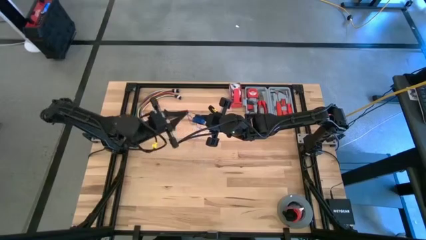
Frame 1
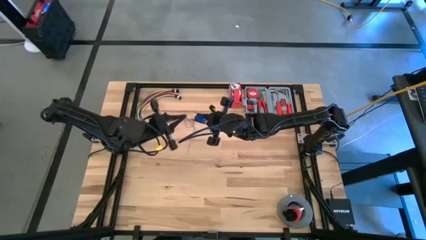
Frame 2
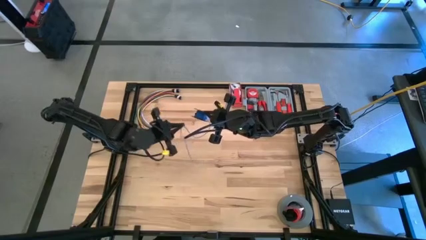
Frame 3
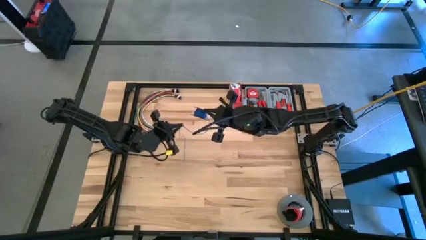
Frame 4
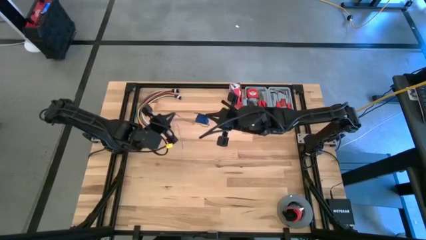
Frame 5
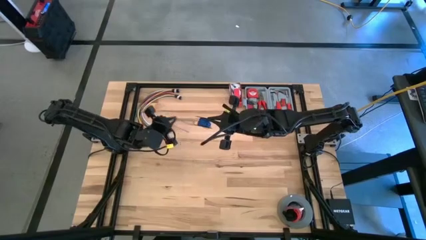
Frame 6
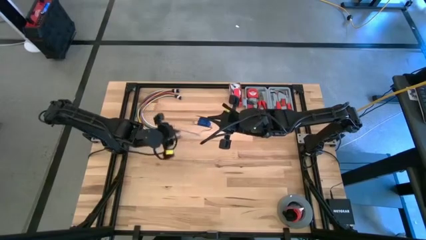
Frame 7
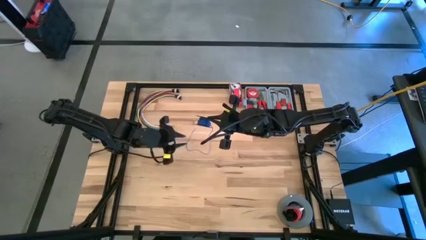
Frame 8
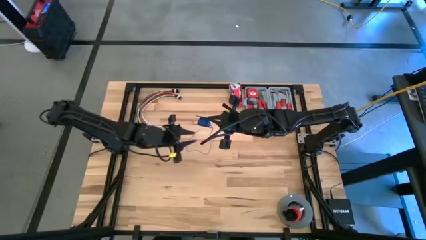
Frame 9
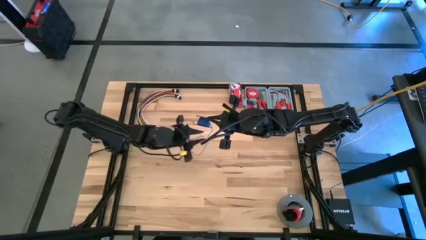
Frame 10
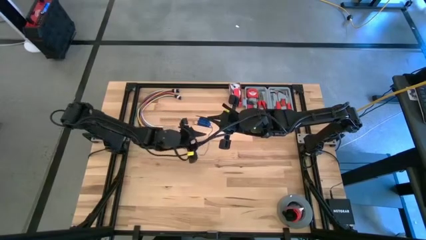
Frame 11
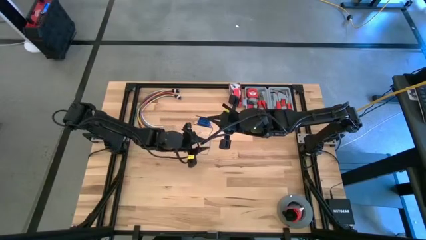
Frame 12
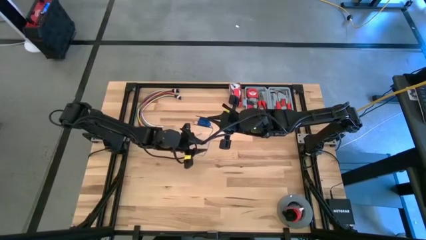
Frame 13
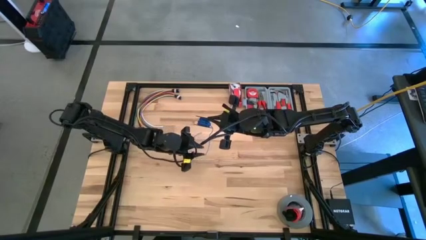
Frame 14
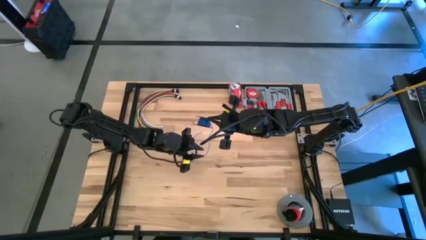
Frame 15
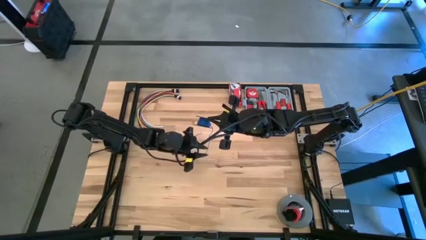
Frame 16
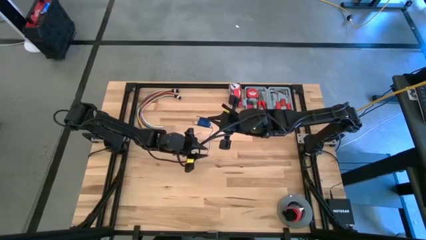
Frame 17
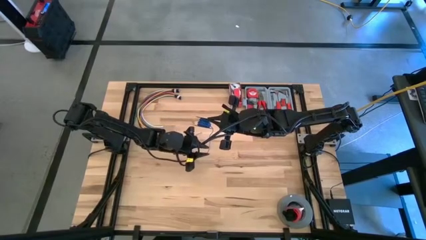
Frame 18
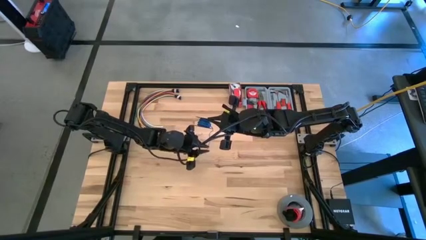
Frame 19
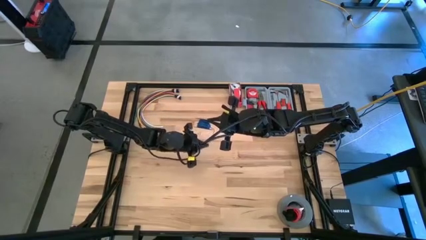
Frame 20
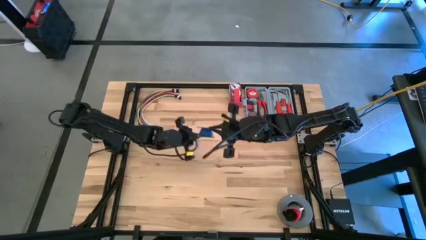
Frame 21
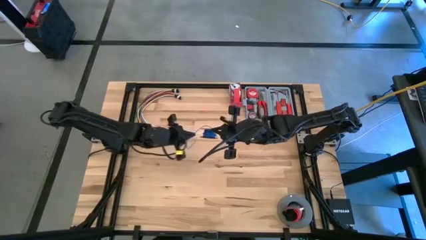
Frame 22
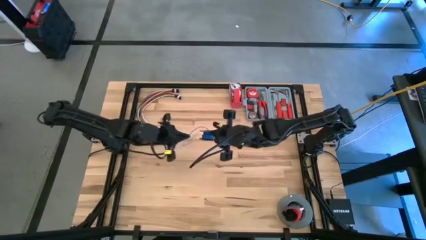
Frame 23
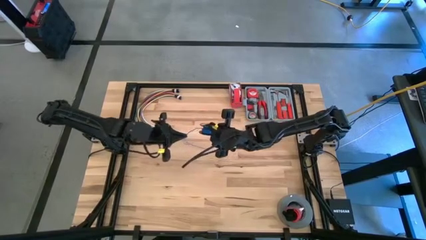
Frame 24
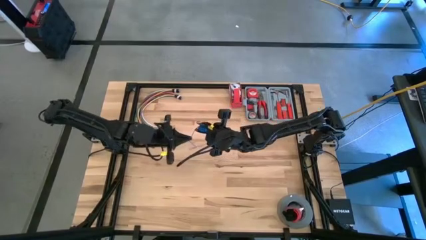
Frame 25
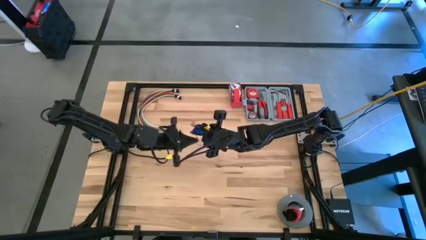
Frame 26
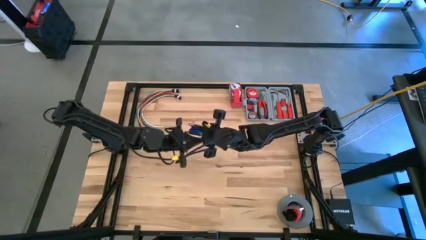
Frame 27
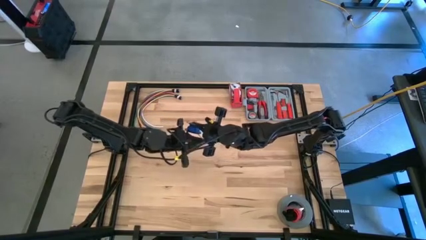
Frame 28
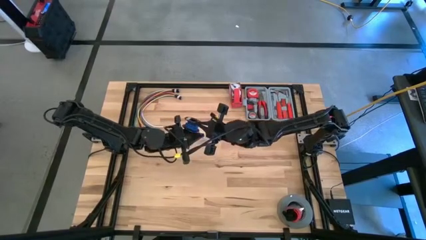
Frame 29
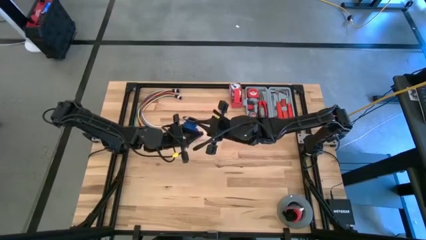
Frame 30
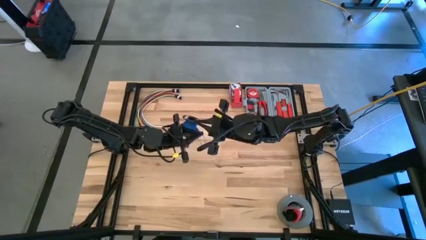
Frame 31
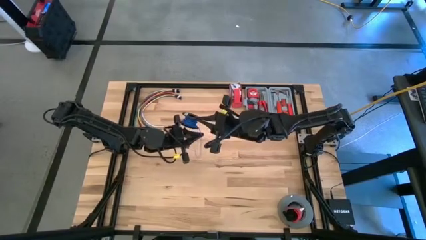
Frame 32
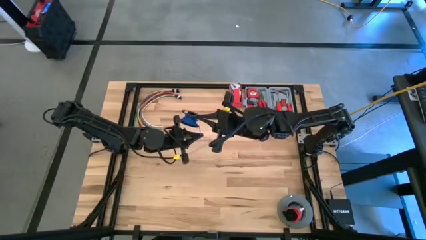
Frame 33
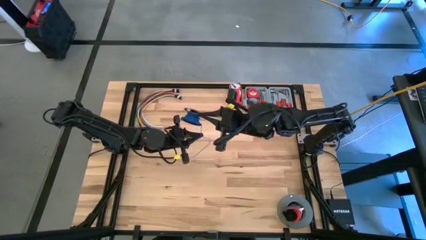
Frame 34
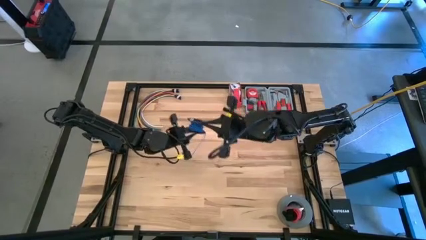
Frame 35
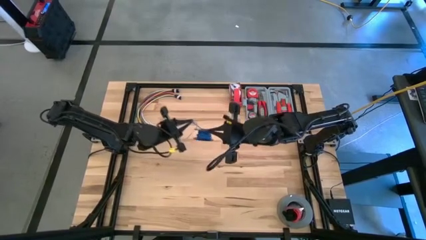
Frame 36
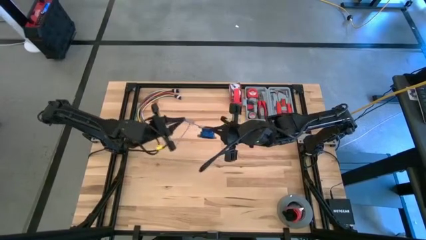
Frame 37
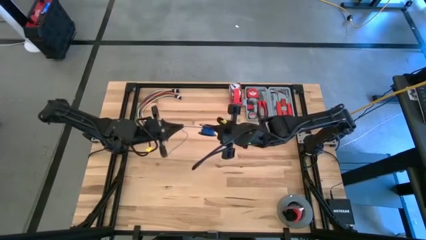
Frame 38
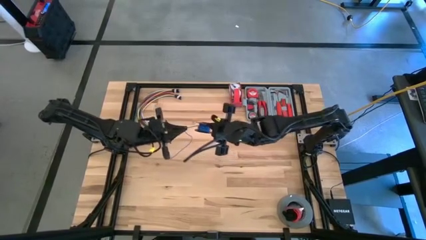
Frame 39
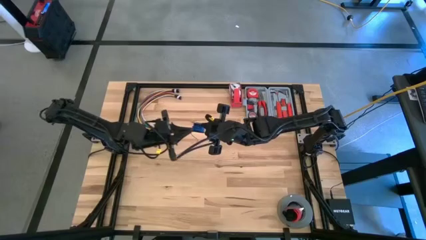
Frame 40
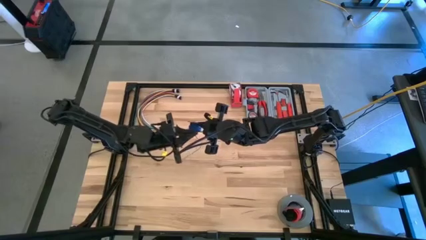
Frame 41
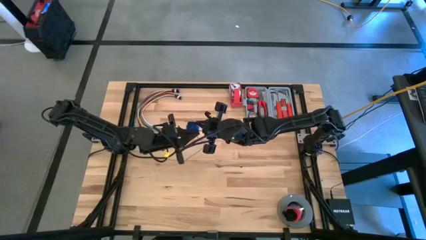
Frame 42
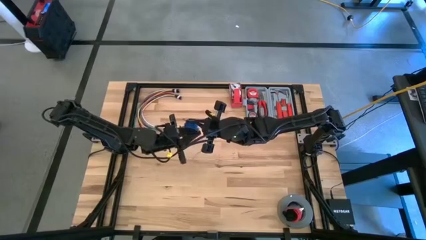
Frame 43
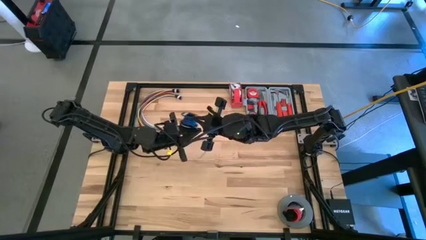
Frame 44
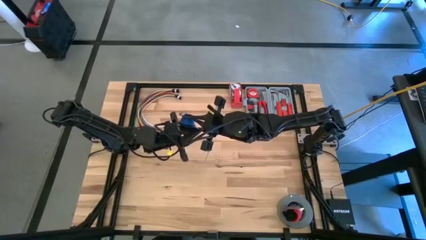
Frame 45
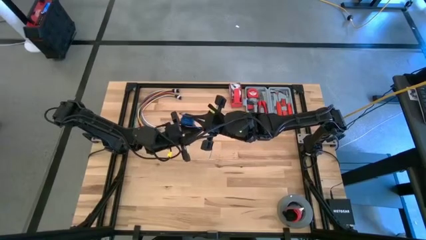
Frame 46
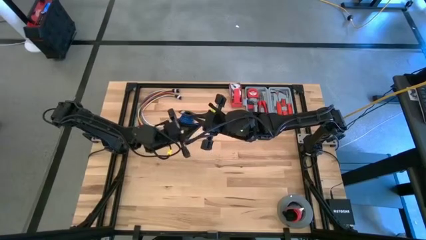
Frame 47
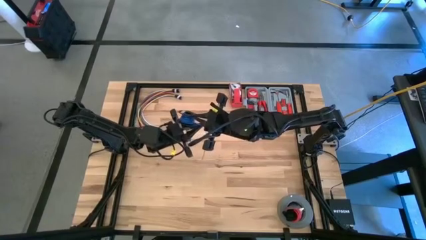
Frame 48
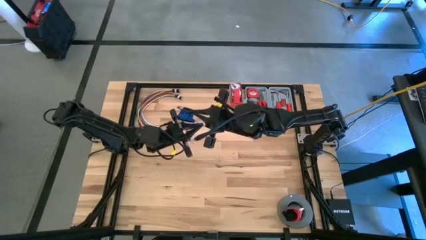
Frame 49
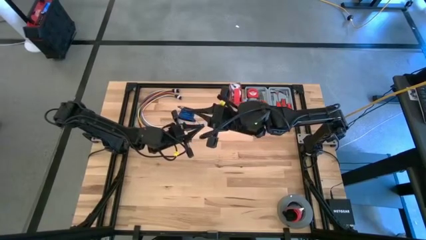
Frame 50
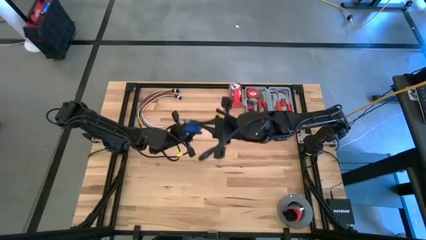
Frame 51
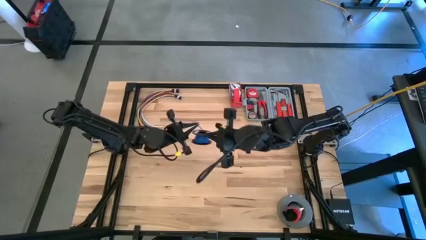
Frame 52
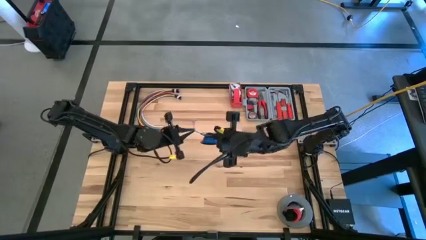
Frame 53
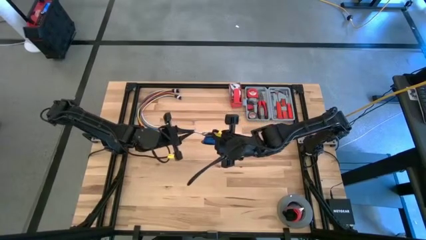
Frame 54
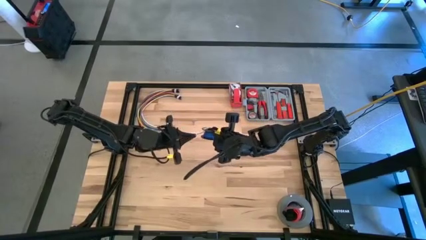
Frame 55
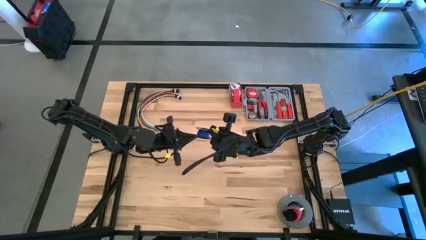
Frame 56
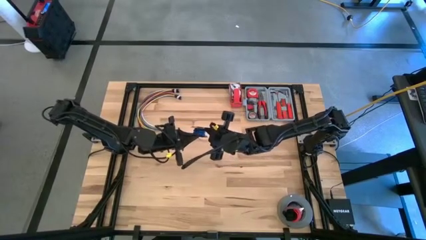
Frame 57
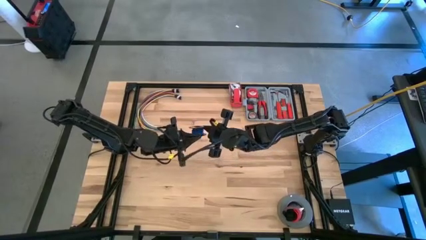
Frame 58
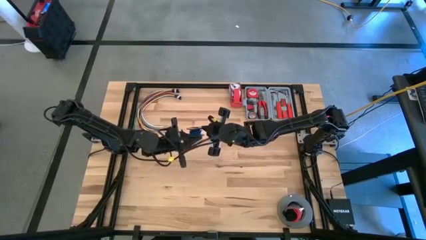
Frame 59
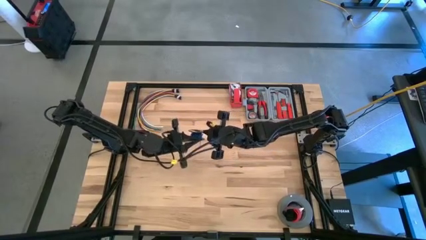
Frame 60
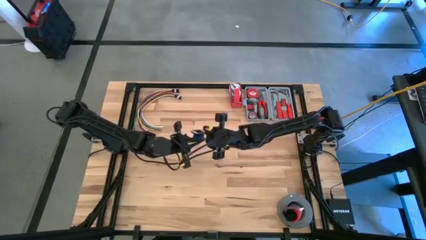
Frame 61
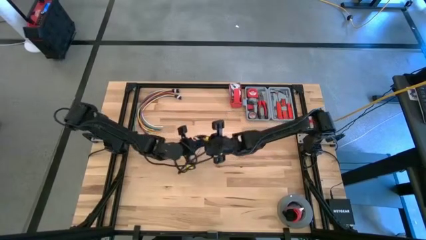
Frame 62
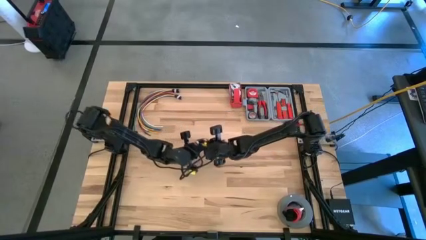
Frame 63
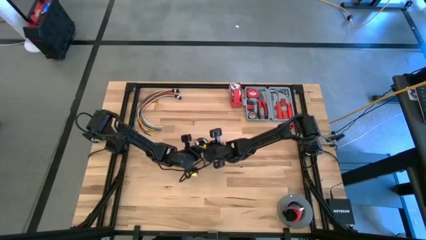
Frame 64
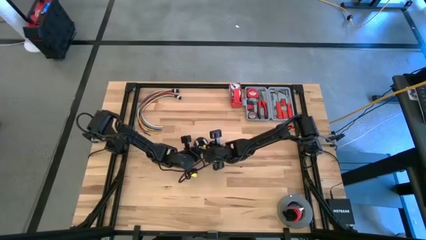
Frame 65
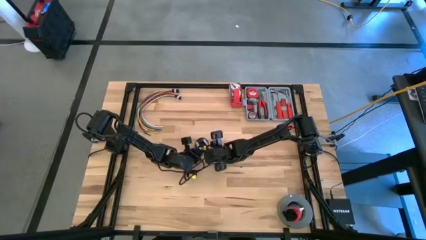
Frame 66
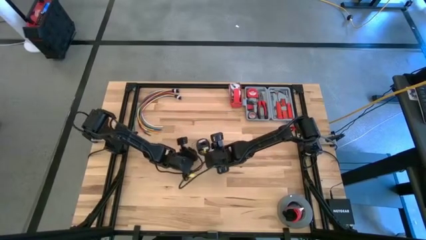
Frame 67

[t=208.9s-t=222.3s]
Task: Coil cords
Coil the blue wire on the black spool

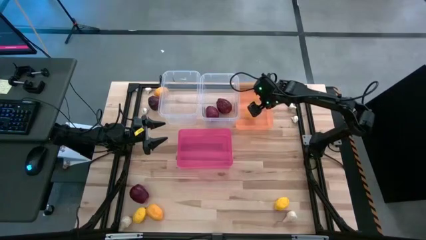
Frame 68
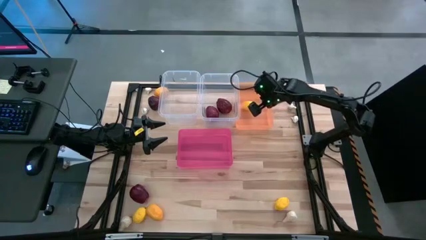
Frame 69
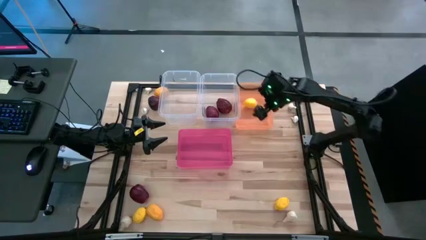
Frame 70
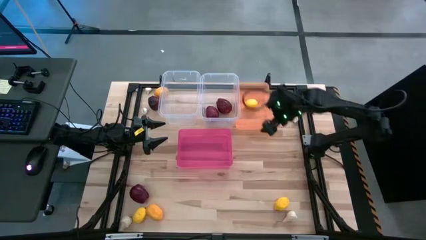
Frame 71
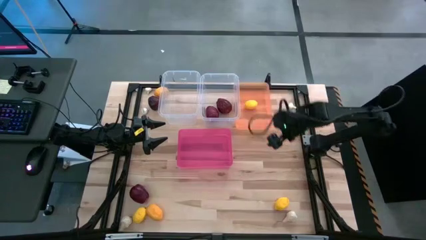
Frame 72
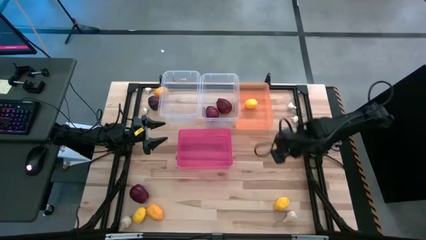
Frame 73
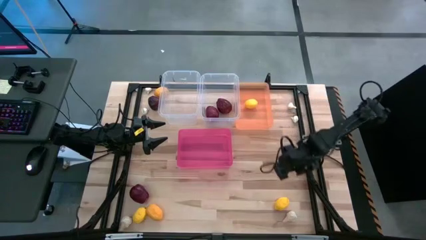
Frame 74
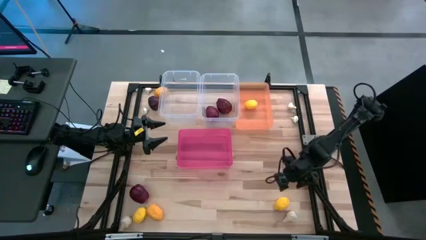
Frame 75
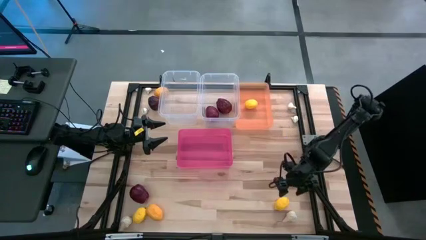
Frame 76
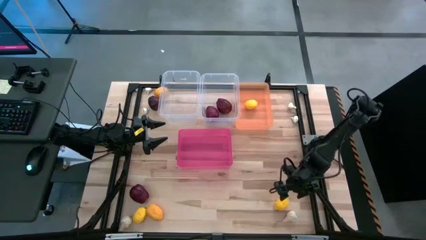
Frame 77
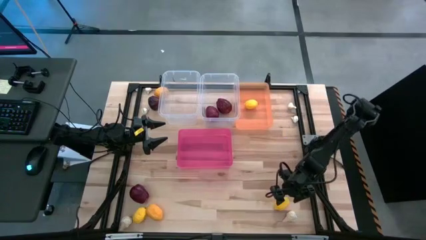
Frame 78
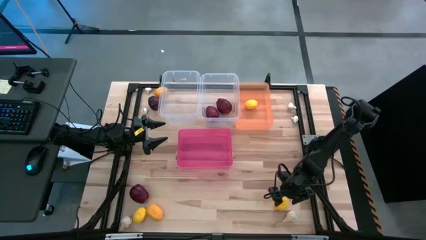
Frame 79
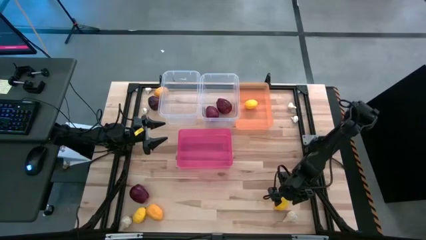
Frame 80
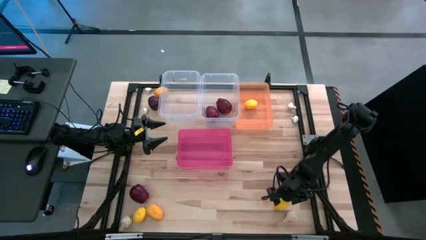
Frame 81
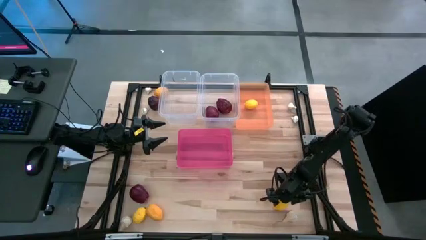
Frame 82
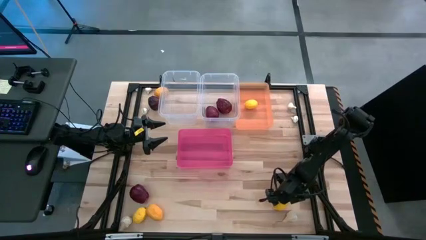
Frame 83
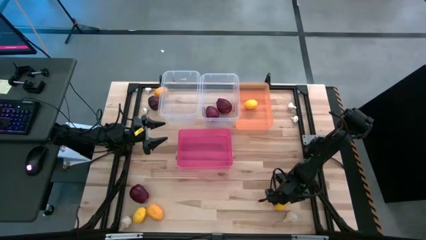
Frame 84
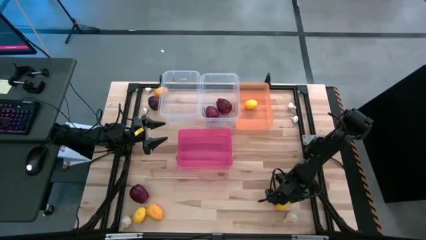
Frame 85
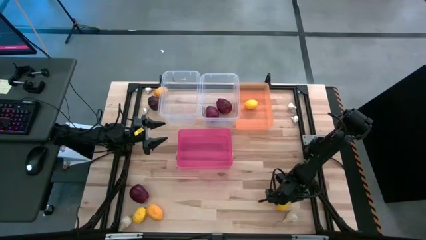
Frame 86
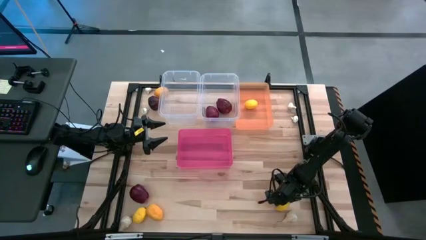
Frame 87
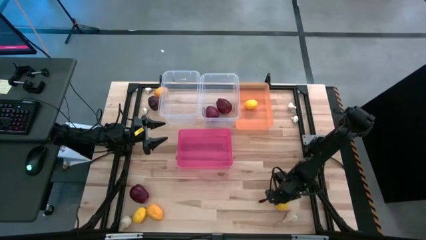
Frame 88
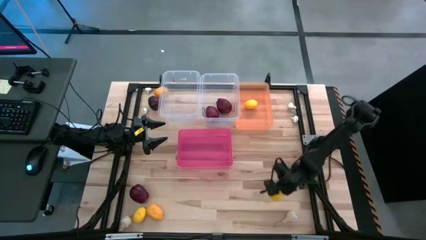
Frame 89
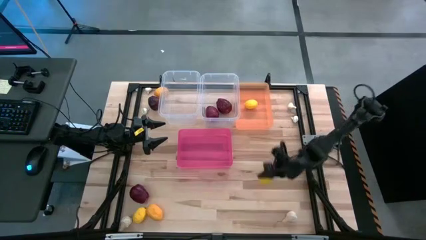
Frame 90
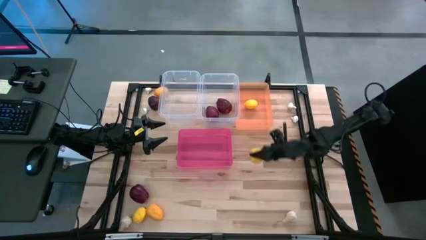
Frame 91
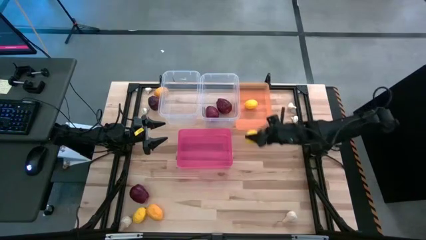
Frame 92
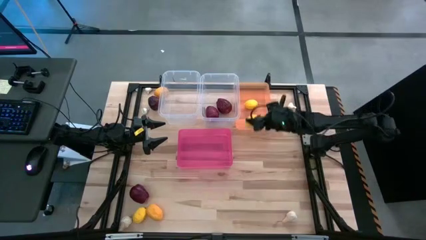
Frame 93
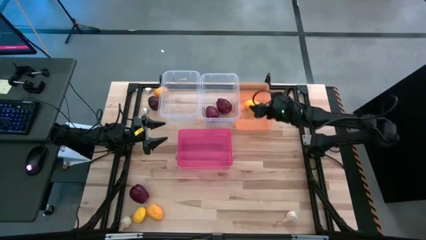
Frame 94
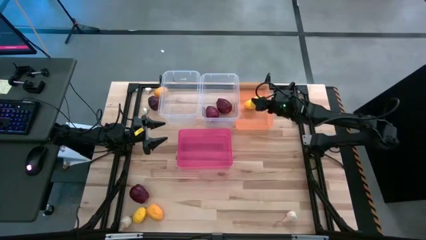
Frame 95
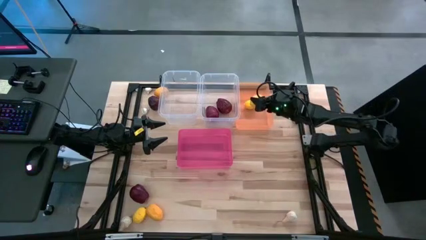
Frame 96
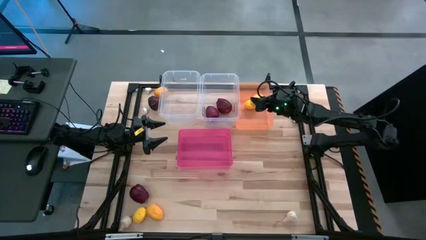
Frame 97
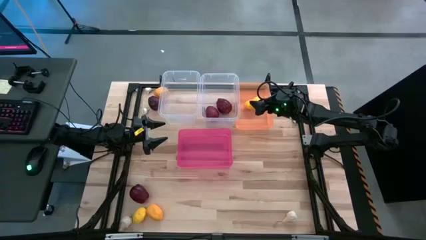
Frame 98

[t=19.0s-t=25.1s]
Task: Sort produce into baskets
Put the yellow lemon into the orange bin
